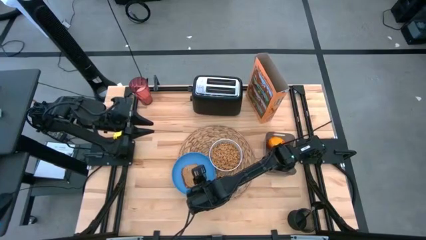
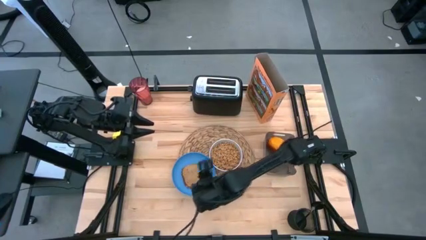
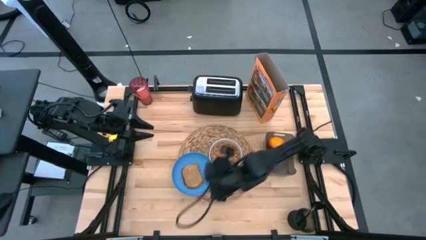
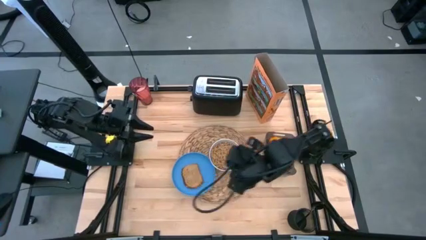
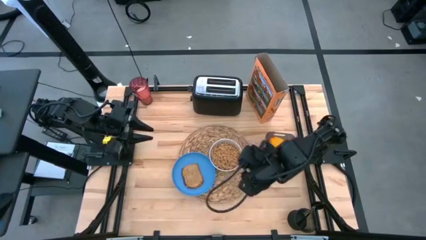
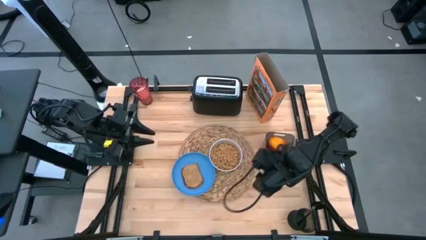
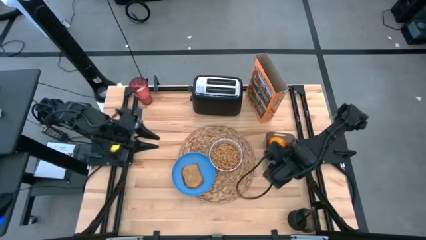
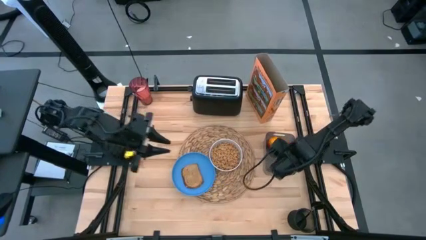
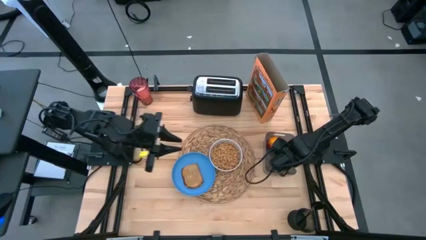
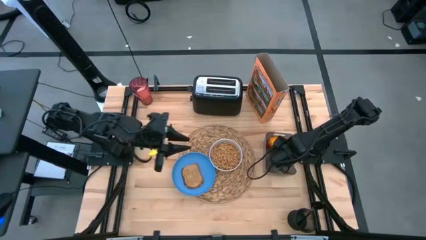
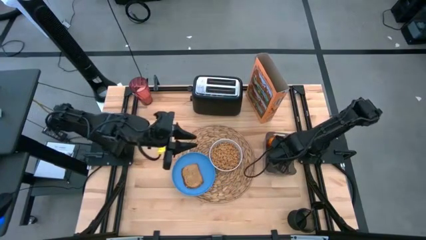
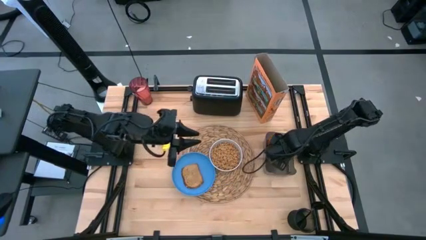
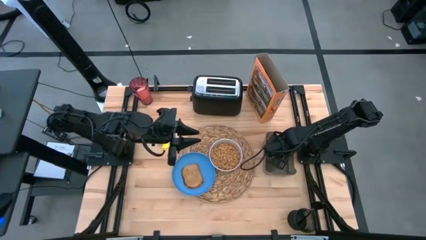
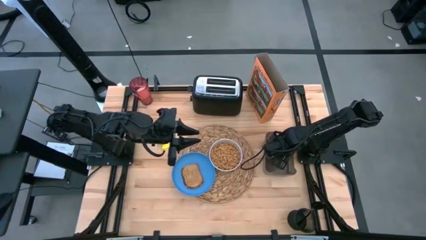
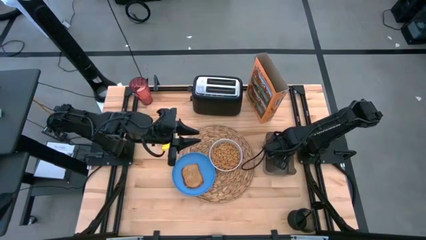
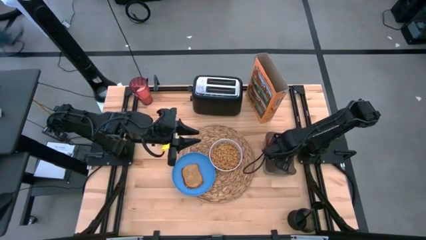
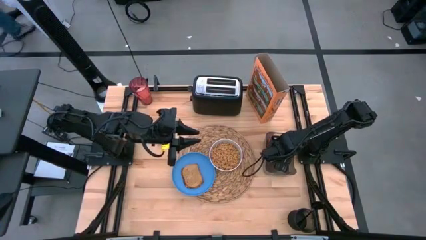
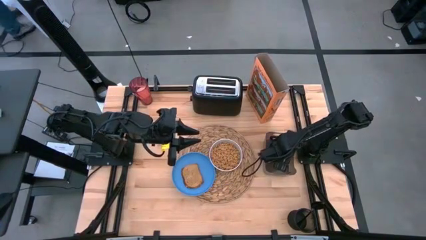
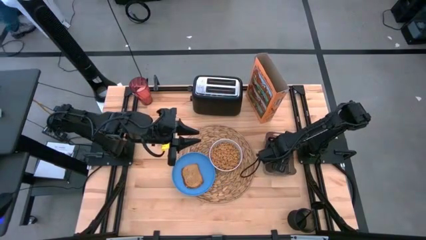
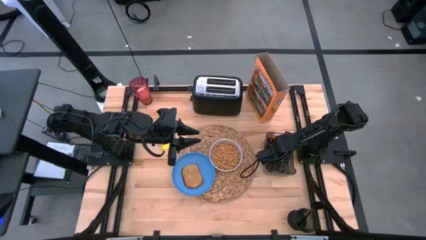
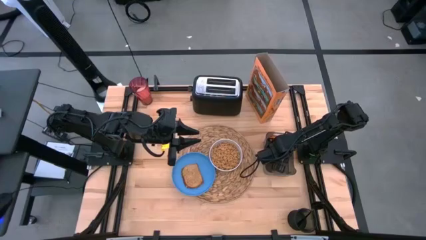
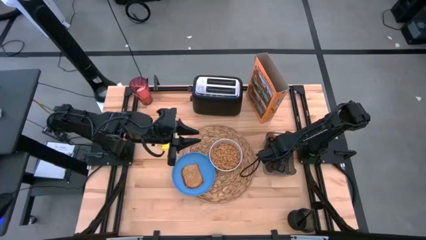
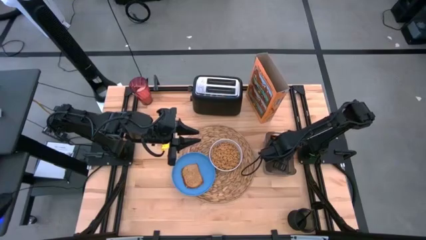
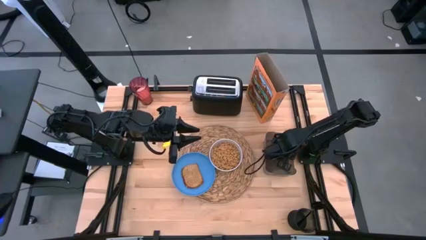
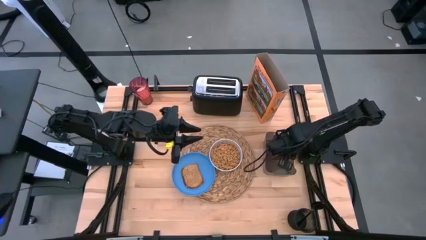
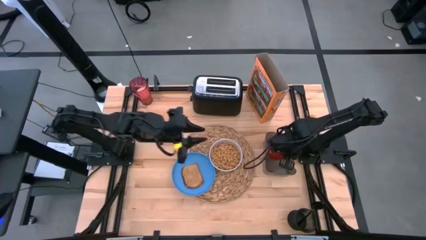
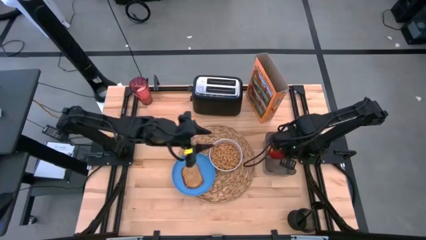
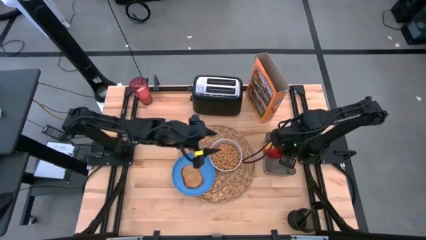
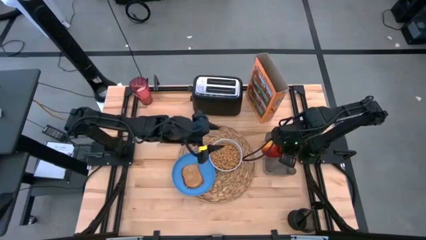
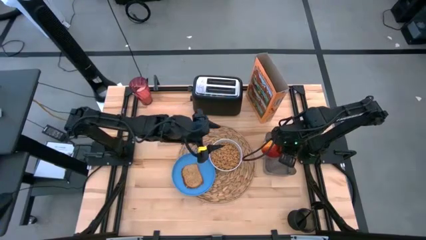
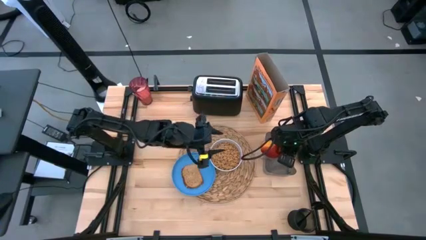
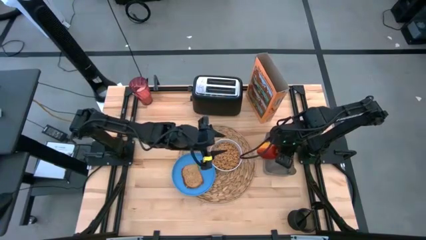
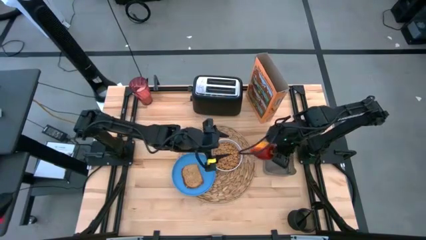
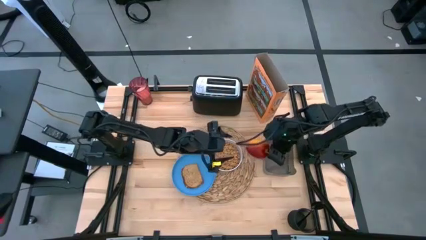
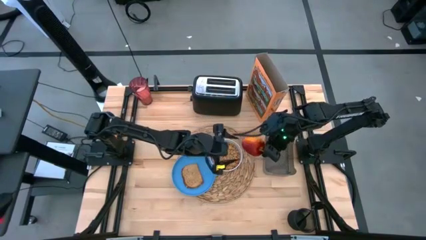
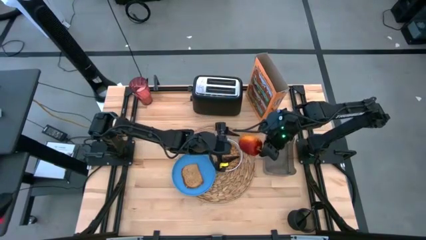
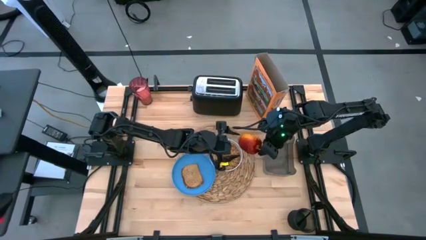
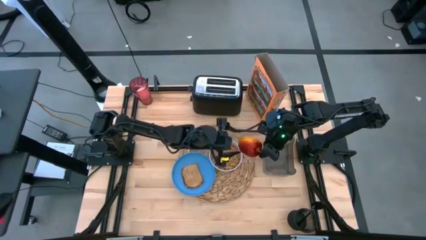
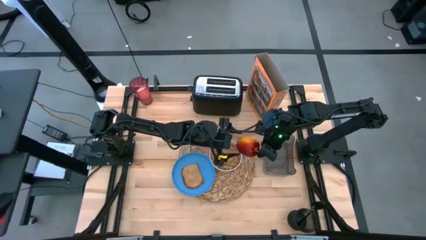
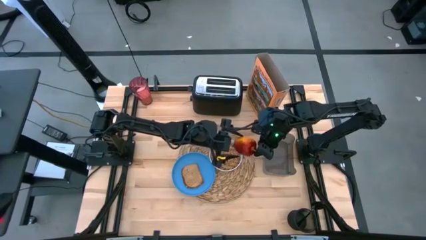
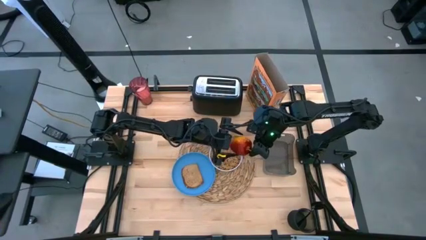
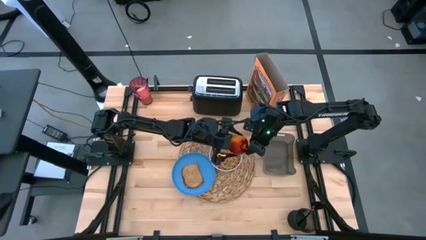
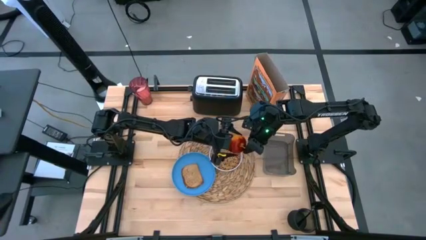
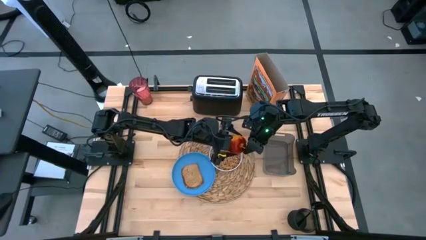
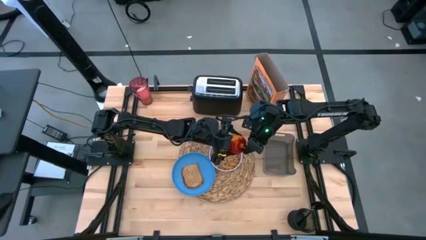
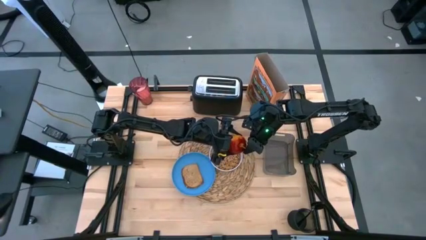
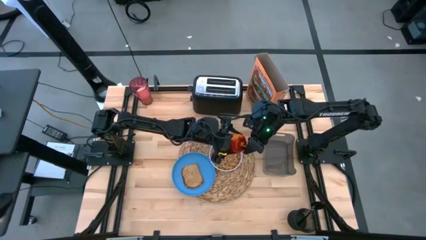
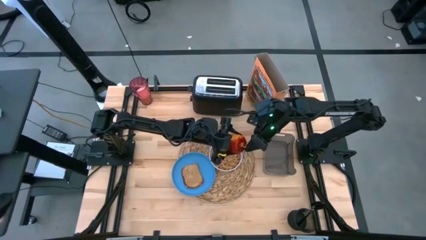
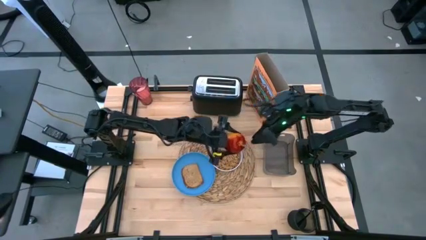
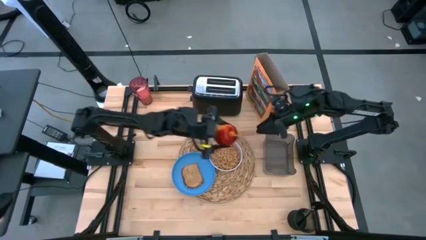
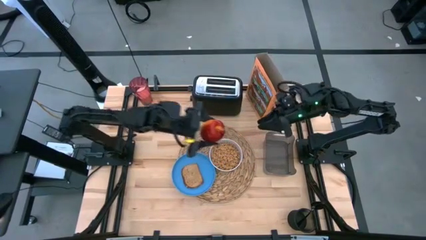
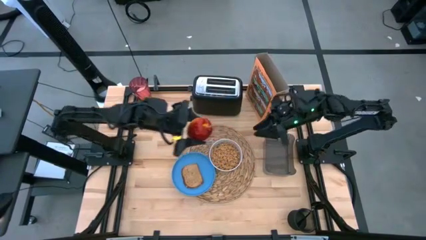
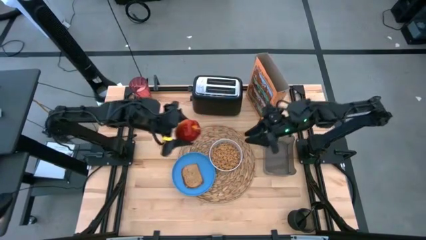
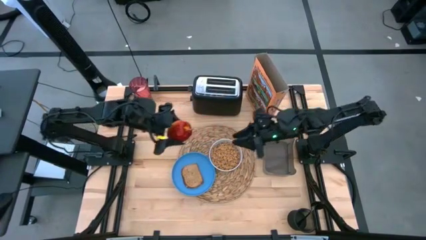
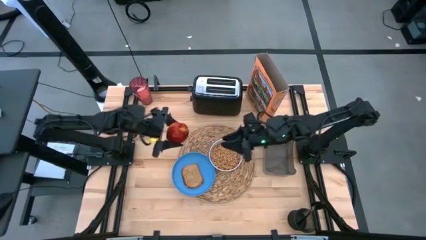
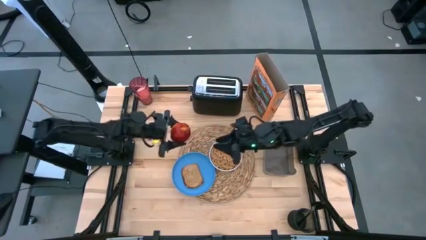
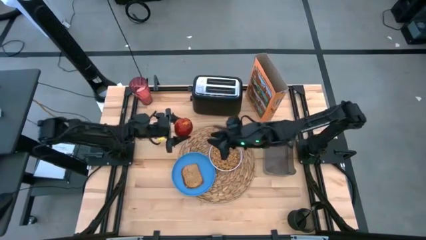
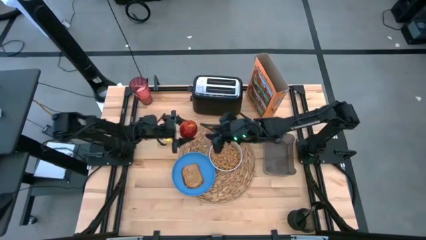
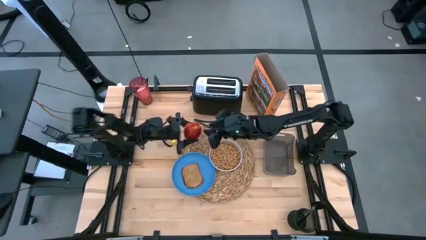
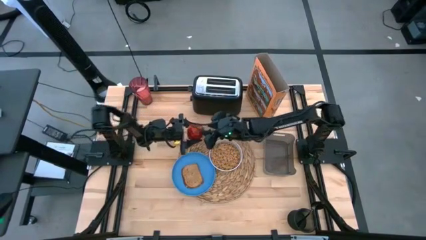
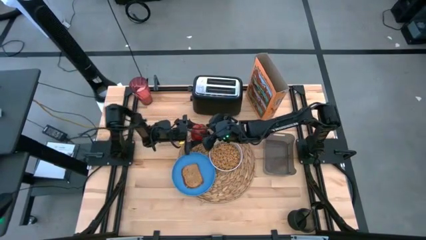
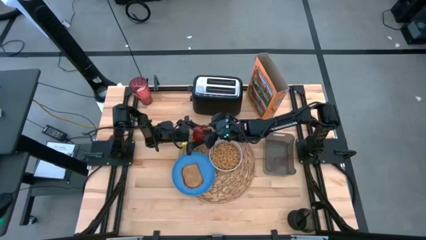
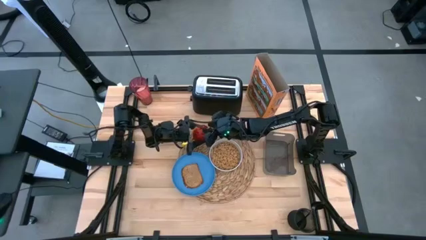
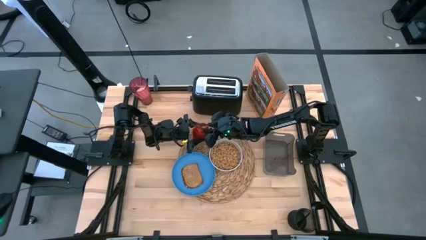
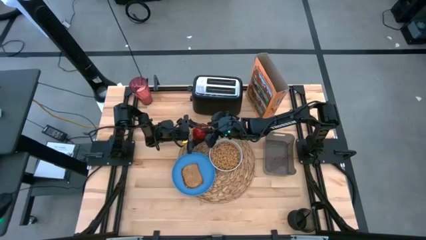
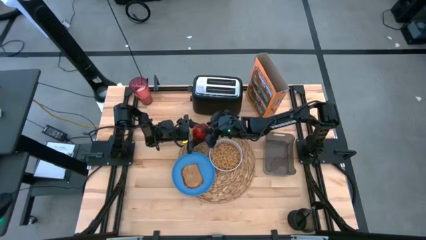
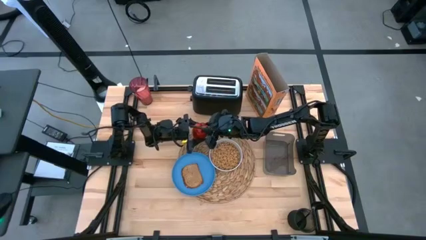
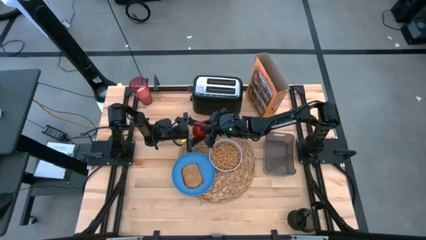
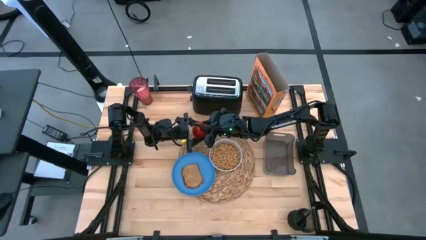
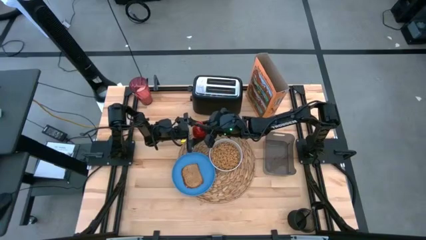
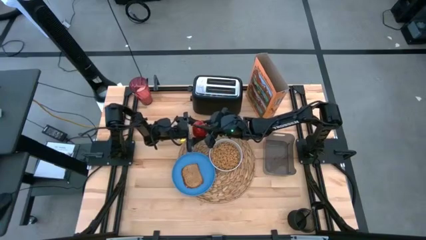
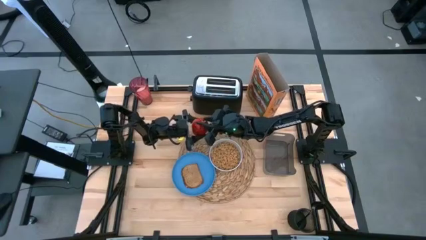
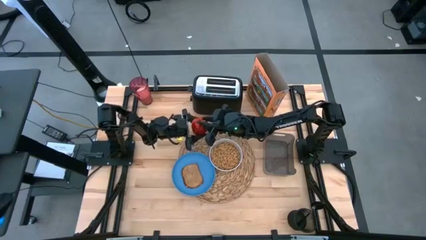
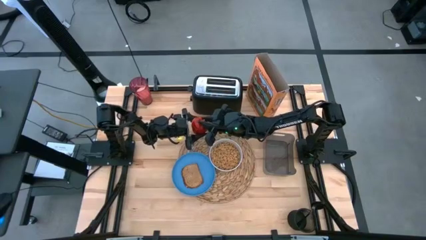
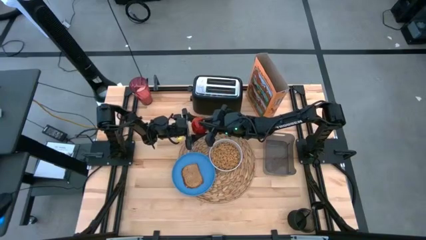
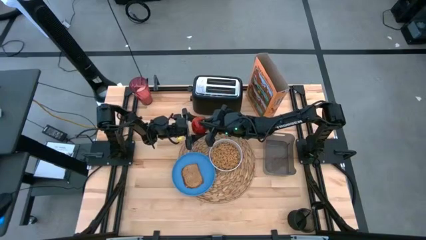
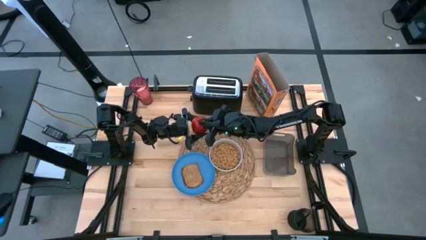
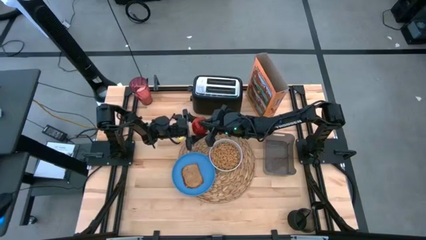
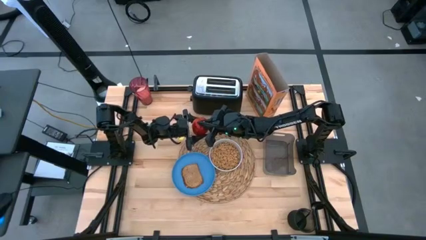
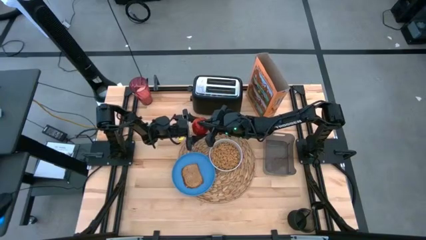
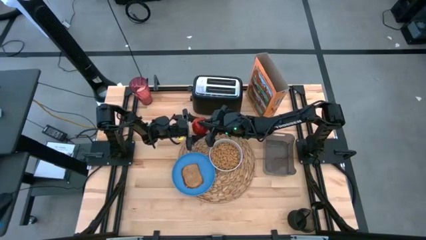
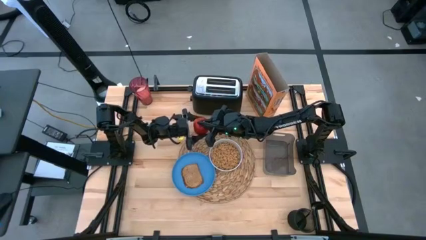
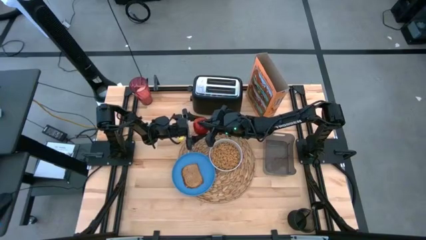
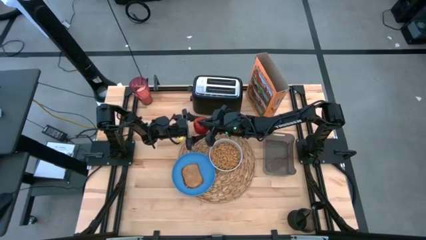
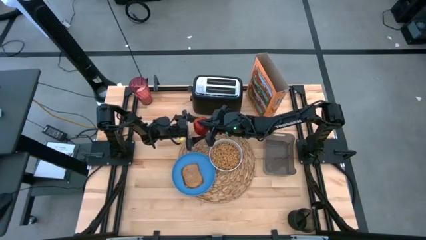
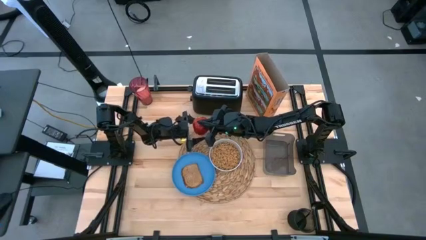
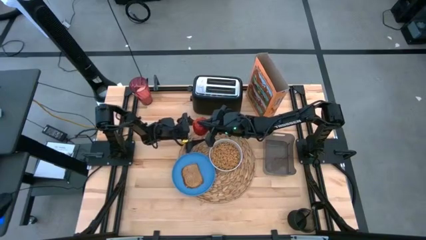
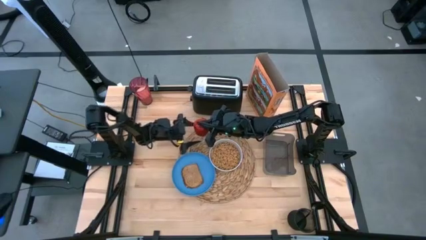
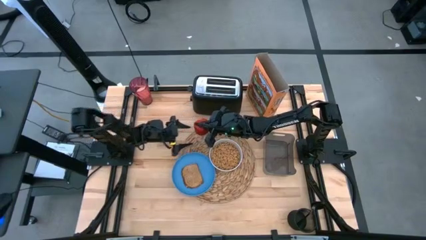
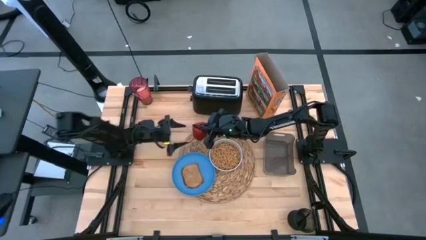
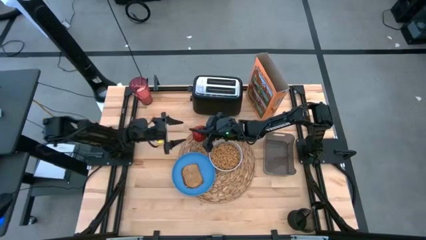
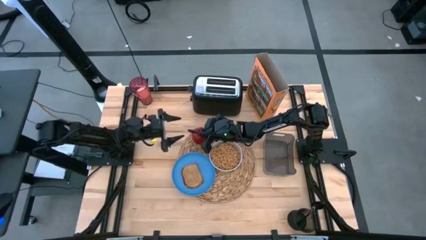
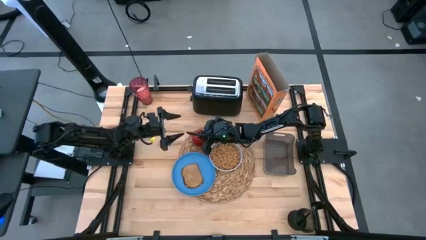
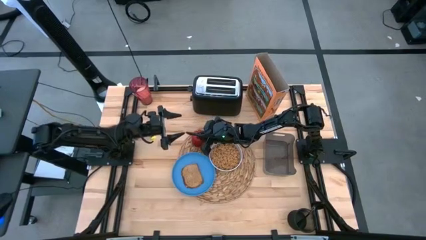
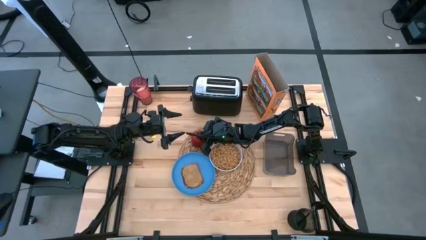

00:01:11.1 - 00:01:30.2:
Task: Arrange a breakfast setting
Put the apple from the black bin on the top left of the table mat
